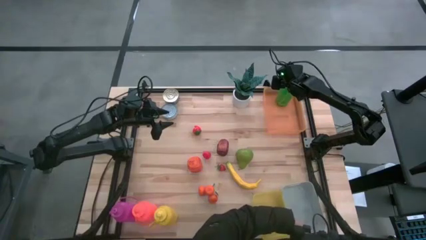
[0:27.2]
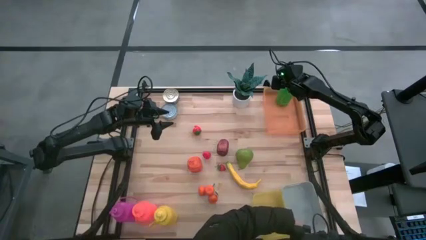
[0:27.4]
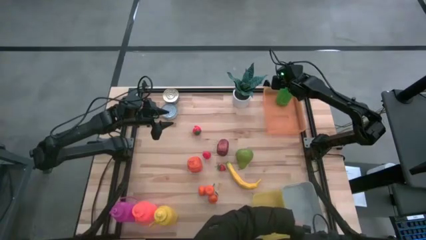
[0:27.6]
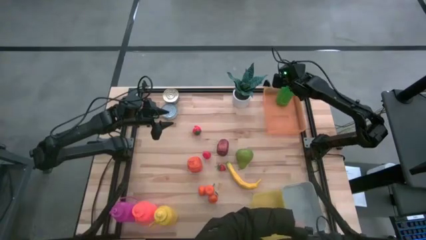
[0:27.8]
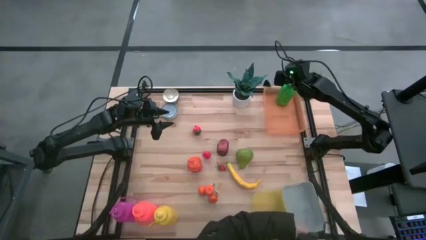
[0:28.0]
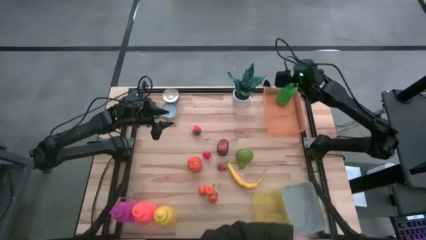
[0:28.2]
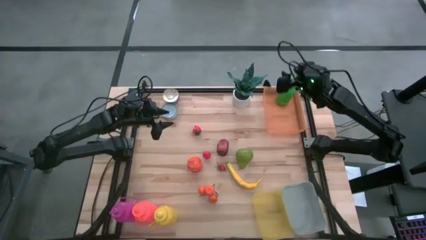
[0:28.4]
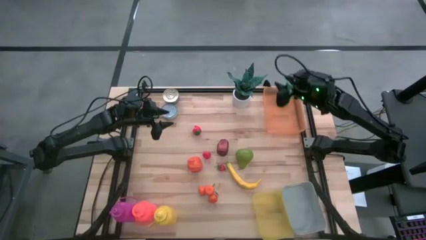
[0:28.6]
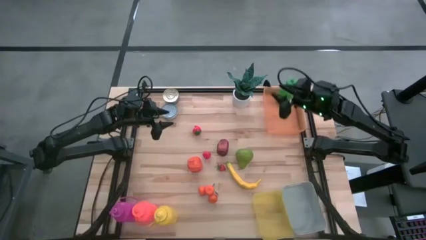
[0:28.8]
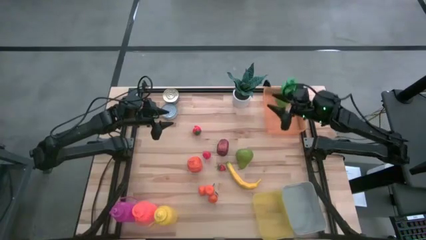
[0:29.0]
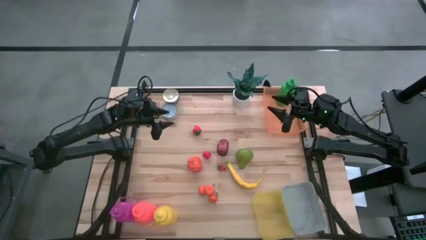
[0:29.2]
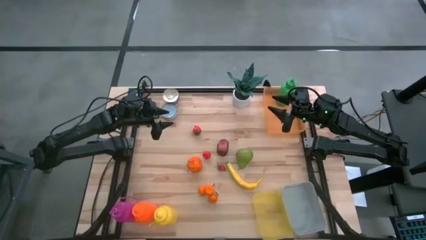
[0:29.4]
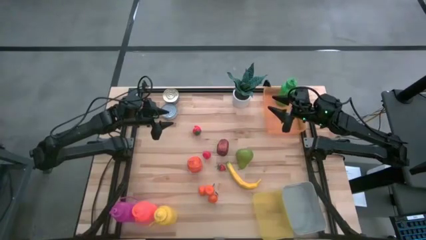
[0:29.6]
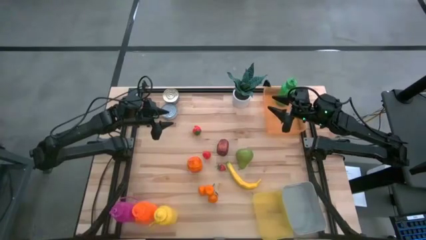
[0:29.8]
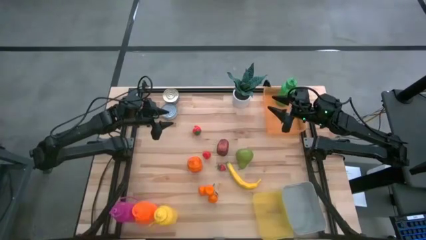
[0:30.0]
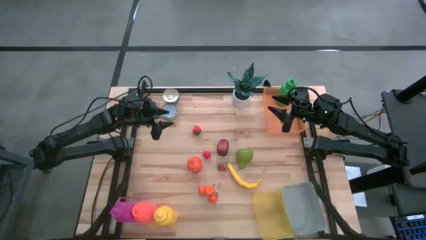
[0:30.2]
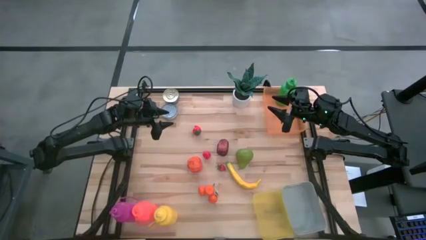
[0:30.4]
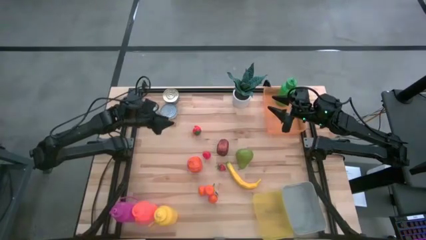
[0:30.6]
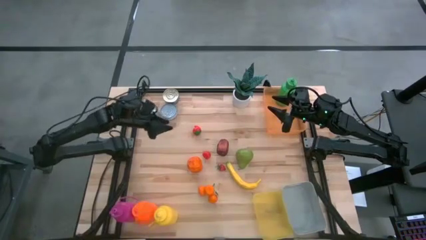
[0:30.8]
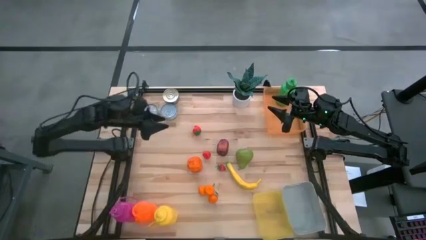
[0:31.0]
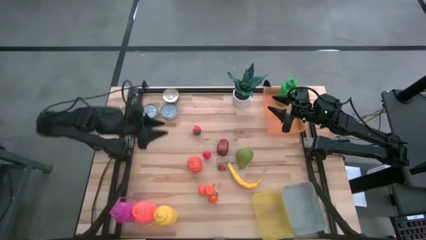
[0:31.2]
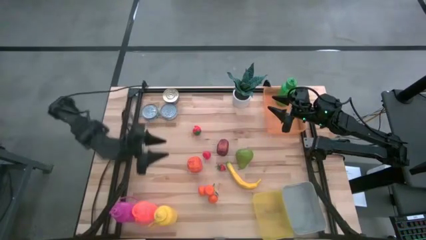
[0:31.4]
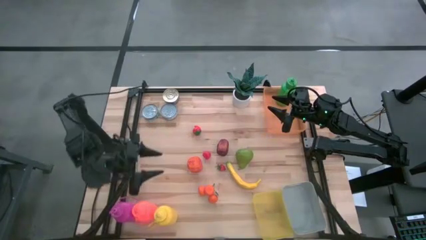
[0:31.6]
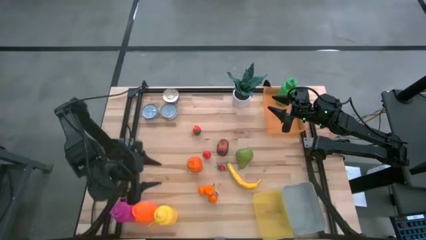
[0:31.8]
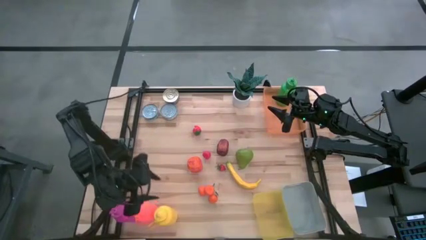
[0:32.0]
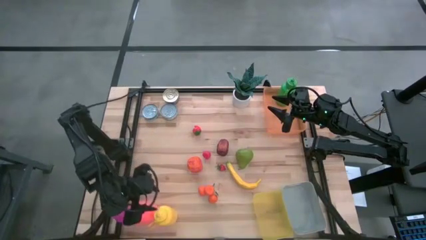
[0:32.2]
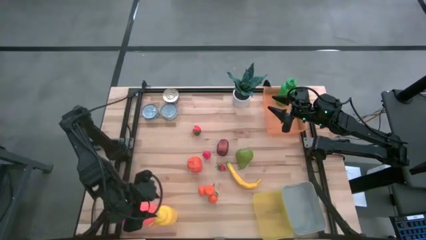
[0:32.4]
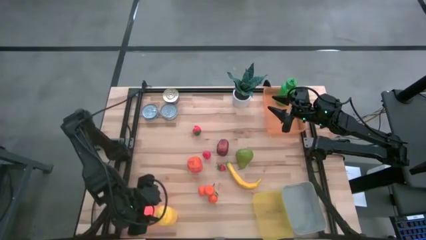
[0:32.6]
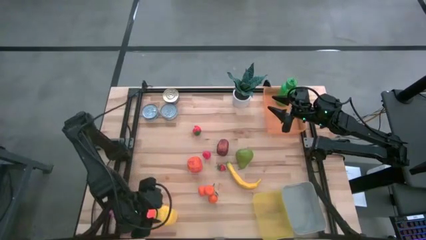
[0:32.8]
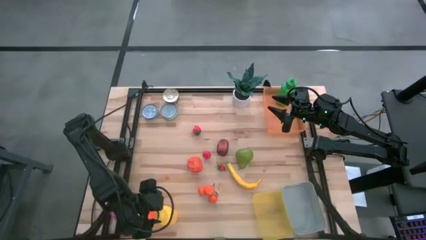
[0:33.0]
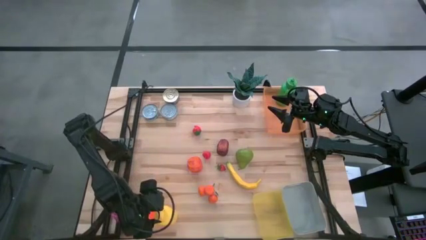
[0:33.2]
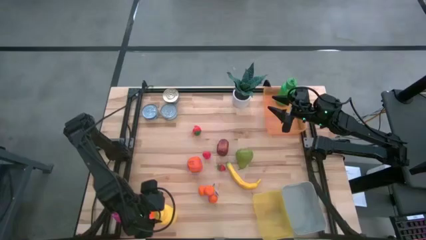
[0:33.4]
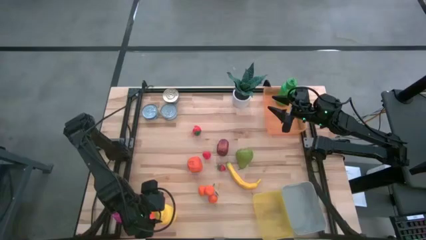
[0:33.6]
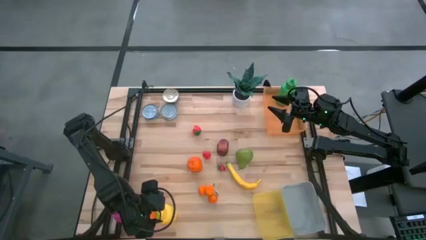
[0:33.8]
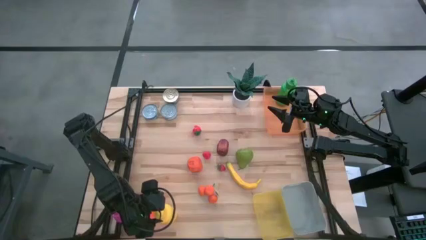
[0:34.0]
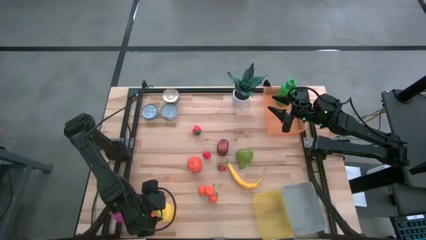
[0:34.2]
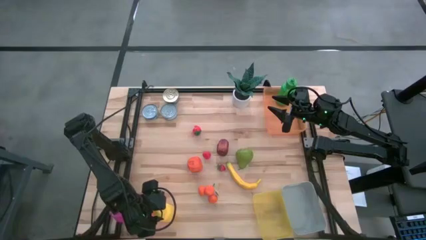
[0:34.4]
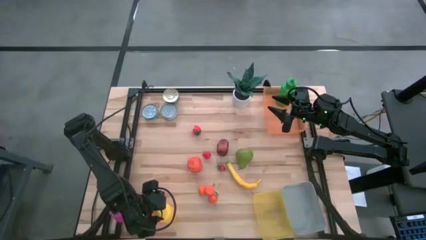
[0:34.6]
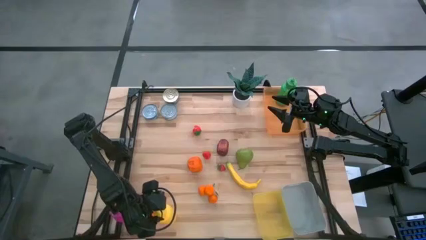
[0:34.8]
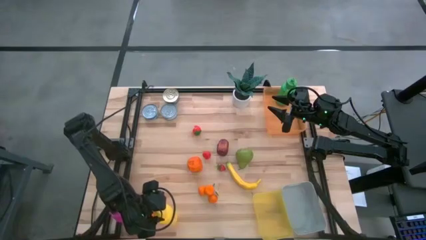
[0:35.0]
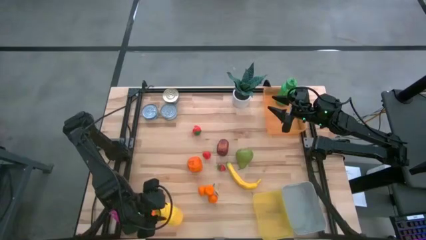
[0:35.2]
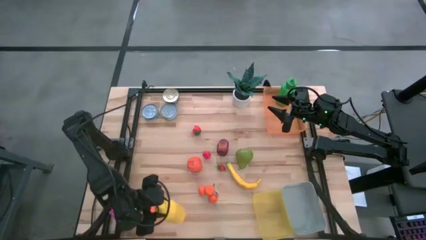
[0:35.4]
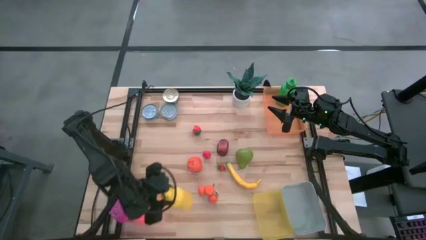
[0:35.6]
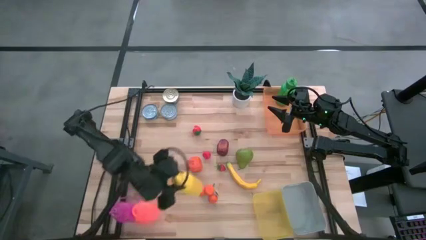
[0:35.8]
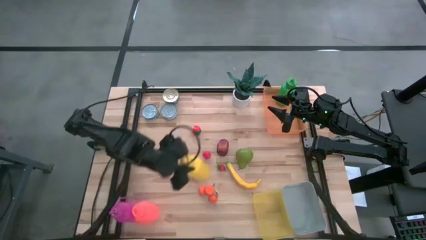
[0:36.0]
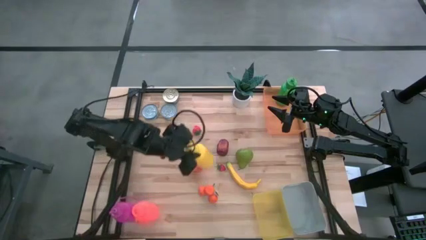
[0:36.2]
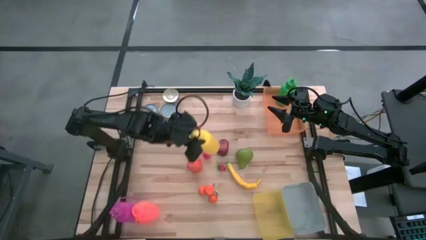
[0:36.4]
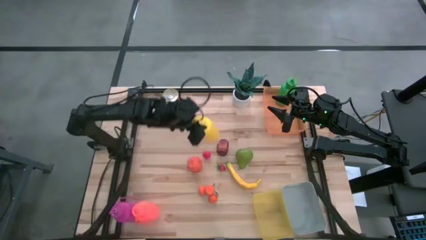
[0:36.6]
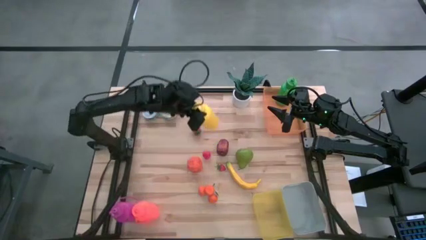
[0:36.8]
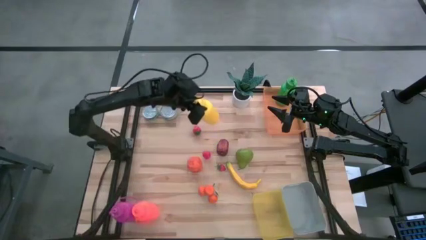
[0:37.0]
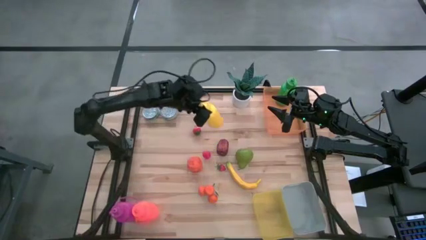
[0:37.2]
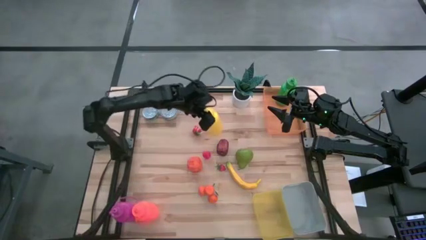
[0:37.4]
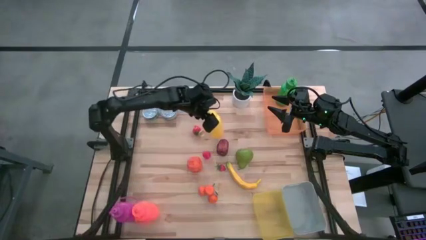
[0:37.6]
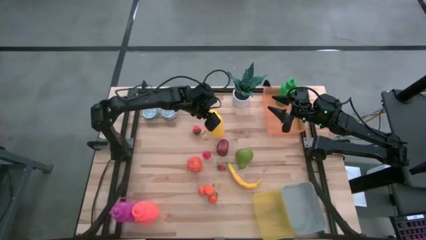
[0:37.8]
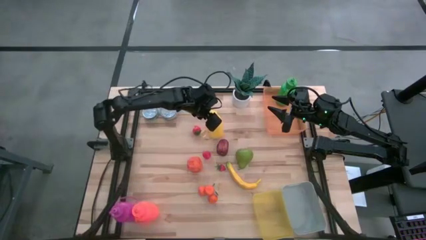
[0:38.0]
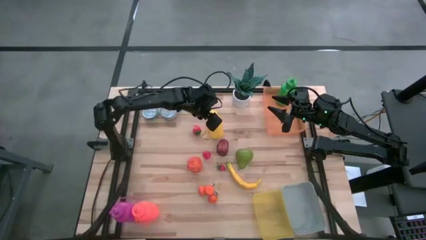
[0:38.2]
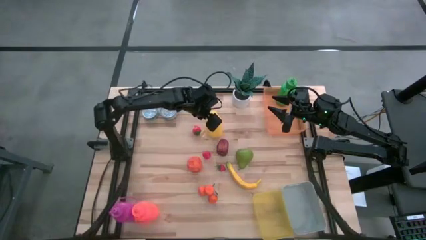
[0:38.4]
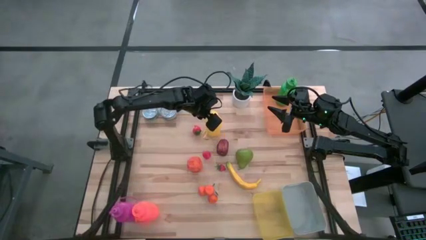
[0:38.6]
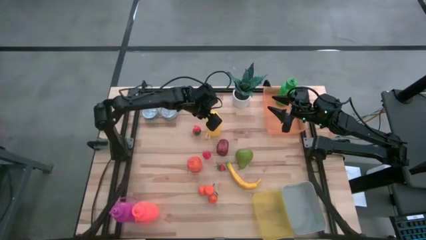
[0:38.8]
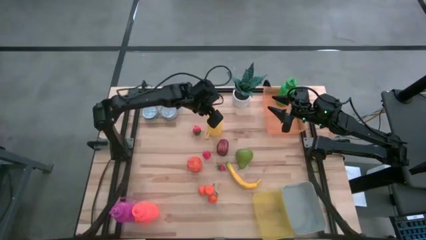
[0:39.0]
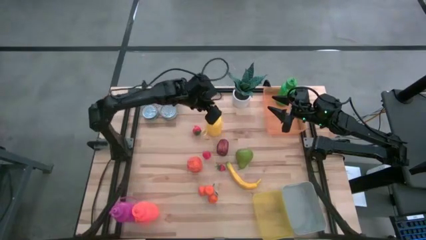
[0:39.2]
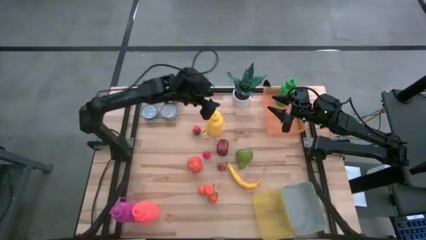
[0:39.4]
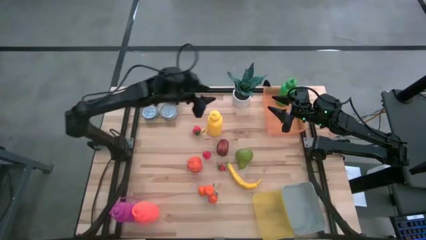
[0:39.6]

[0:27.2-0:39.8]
Task: Pick & Place Food Item
Put the yellow water bottle into the orange bin
